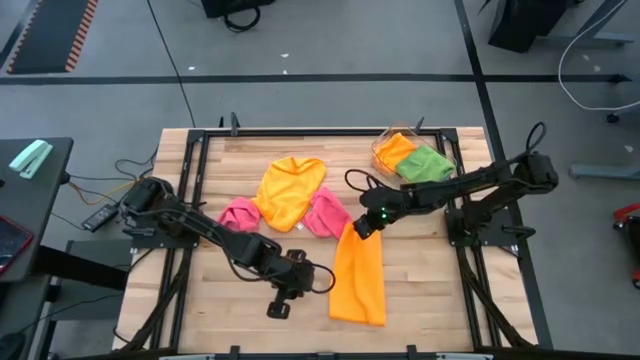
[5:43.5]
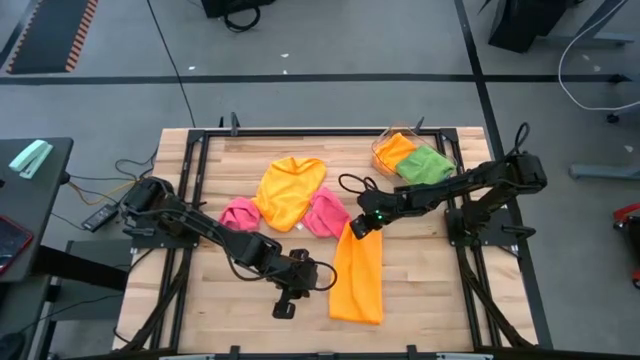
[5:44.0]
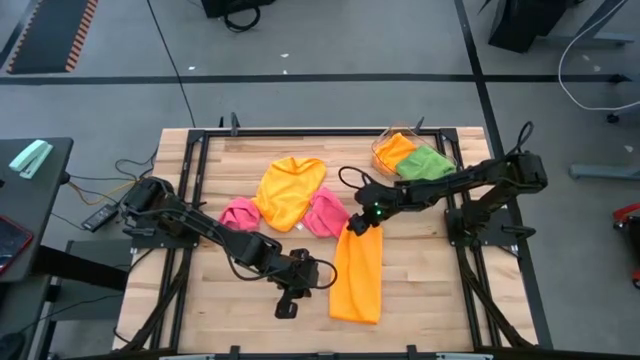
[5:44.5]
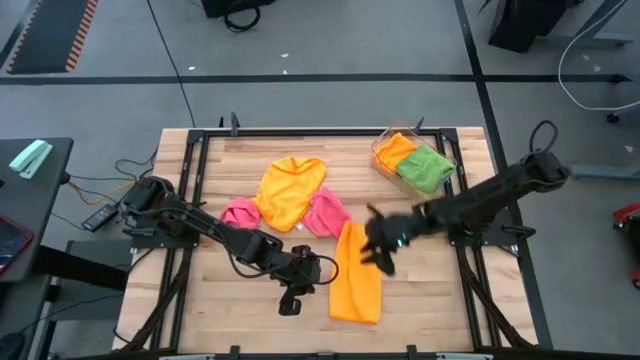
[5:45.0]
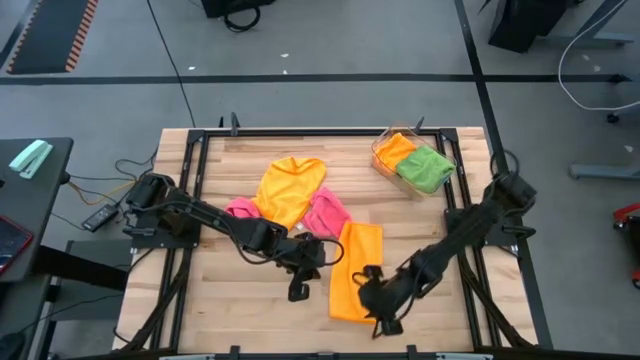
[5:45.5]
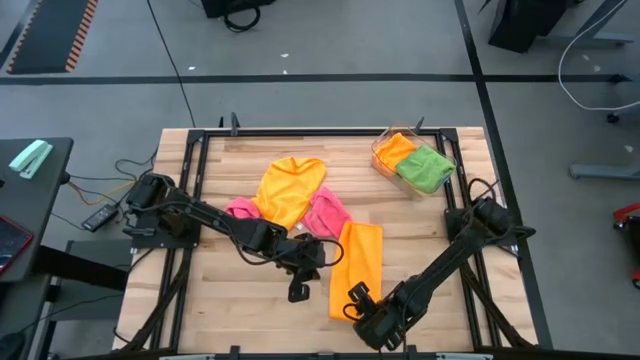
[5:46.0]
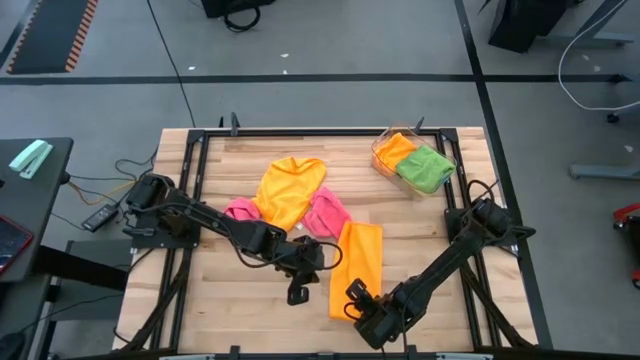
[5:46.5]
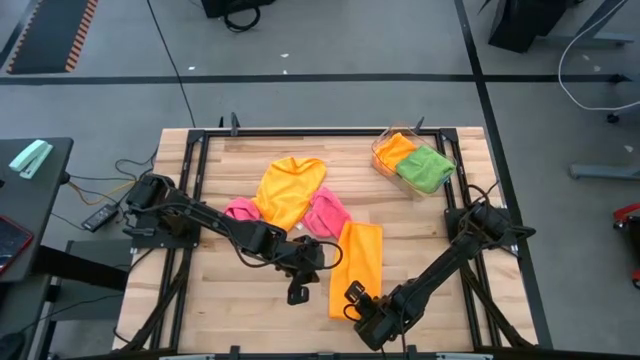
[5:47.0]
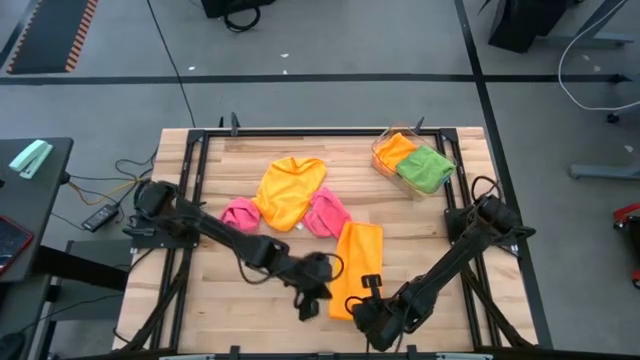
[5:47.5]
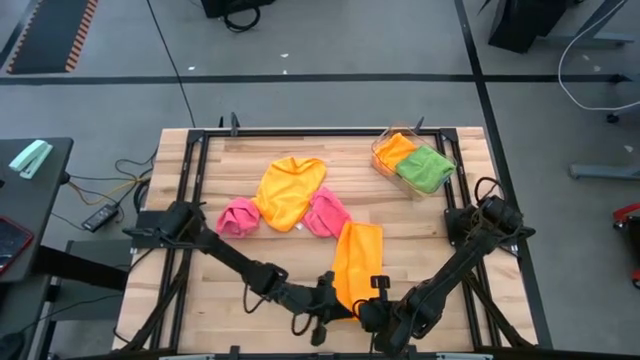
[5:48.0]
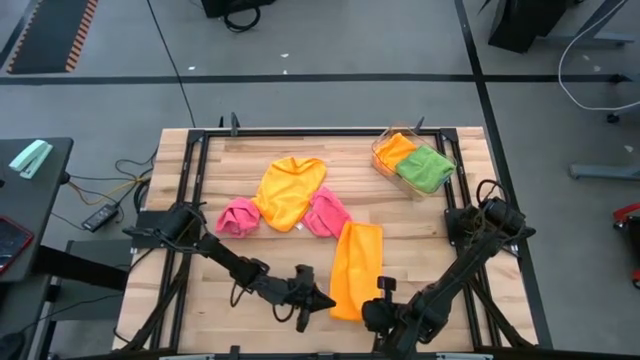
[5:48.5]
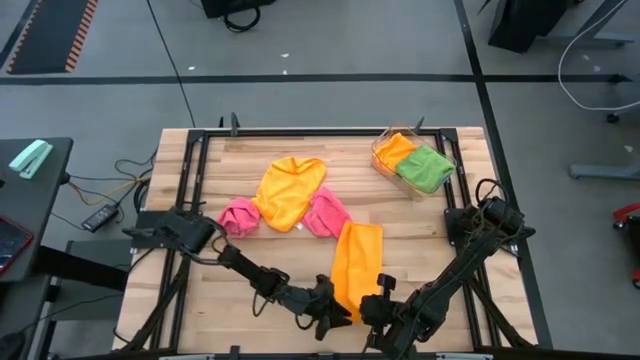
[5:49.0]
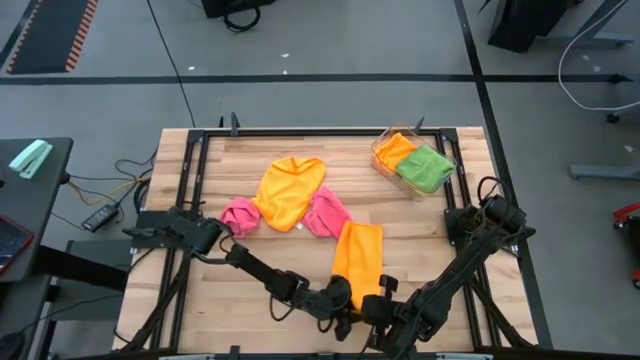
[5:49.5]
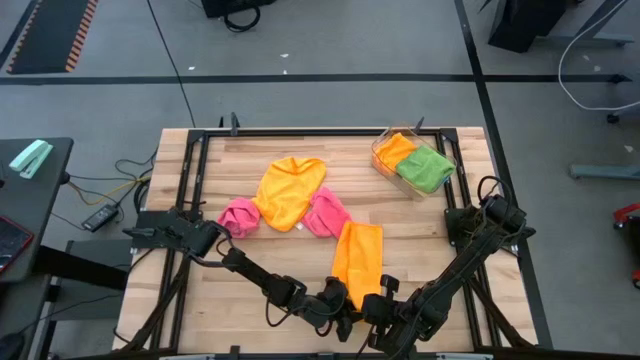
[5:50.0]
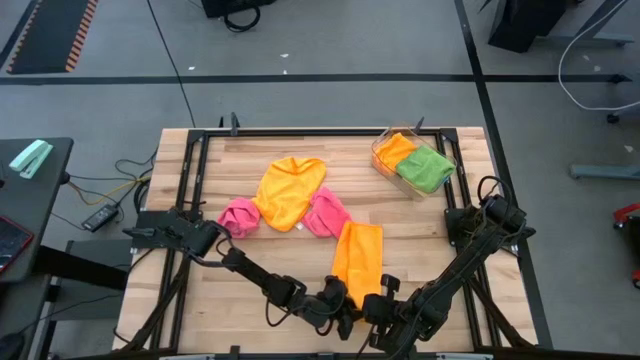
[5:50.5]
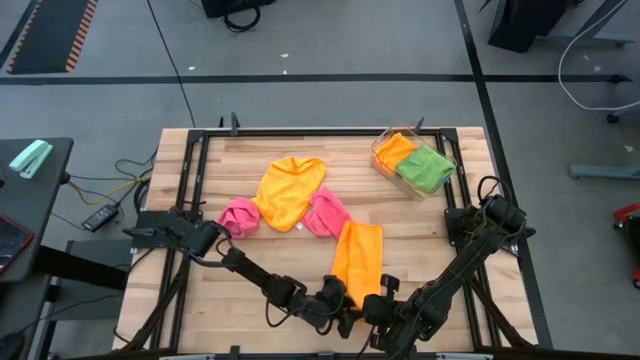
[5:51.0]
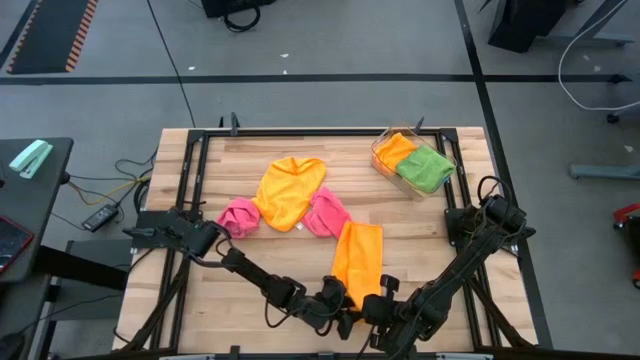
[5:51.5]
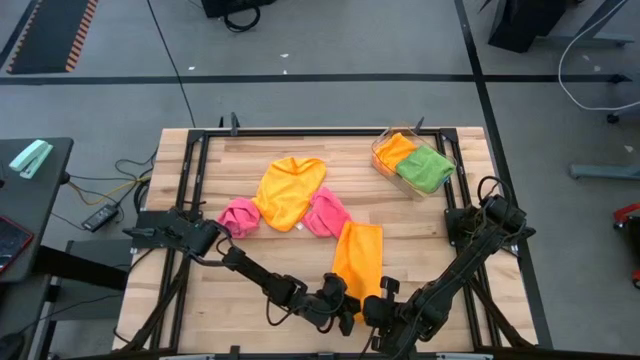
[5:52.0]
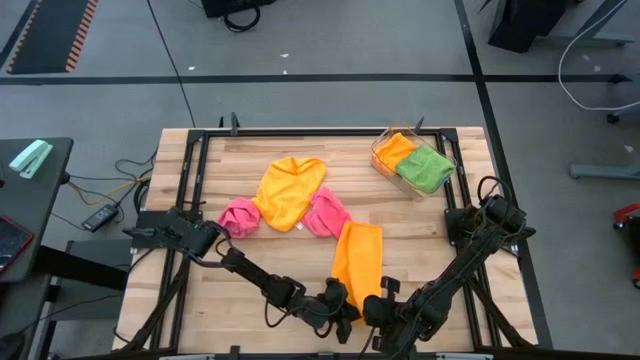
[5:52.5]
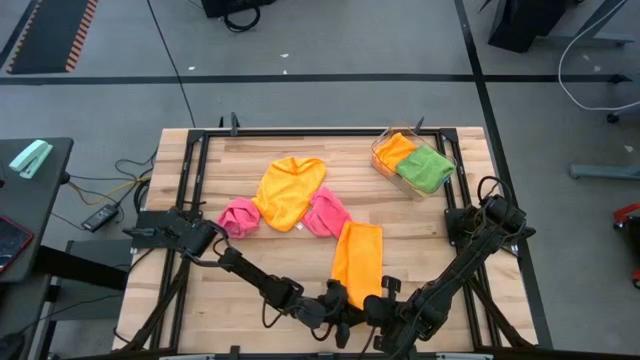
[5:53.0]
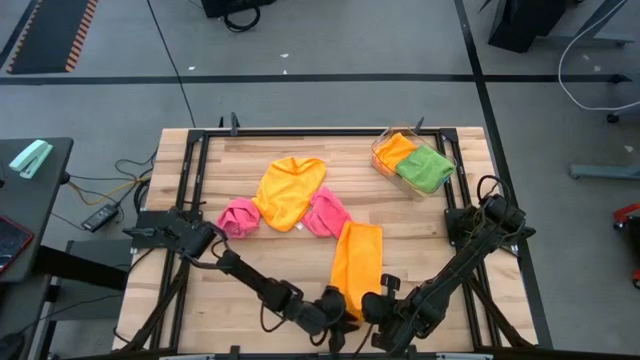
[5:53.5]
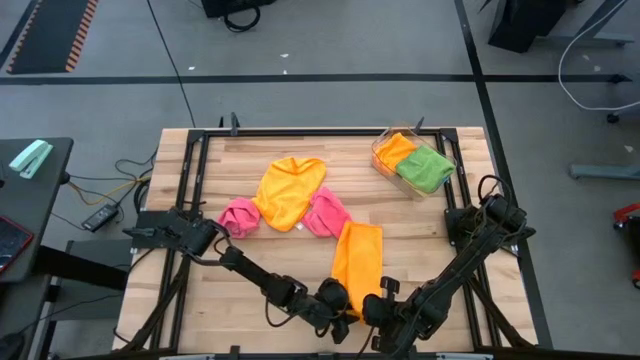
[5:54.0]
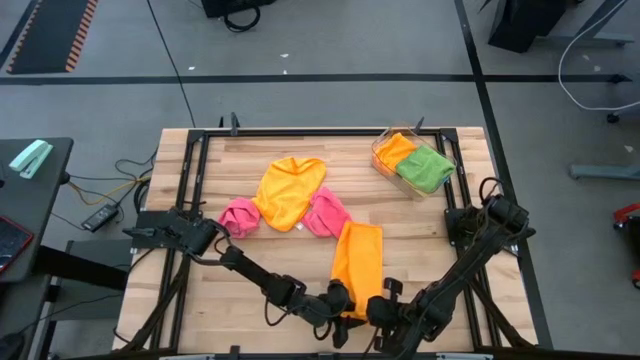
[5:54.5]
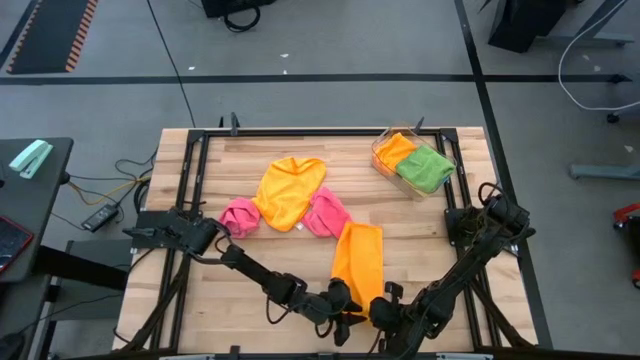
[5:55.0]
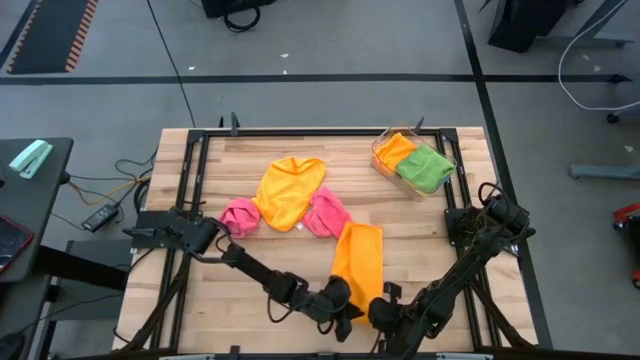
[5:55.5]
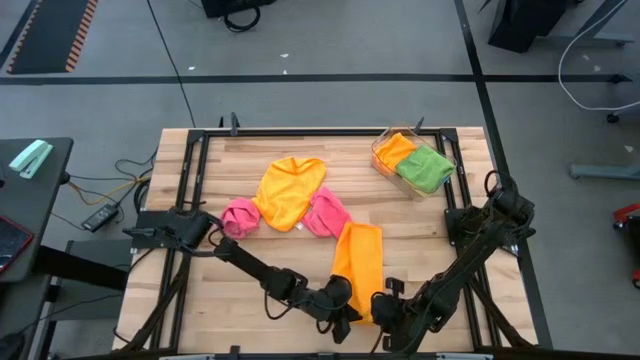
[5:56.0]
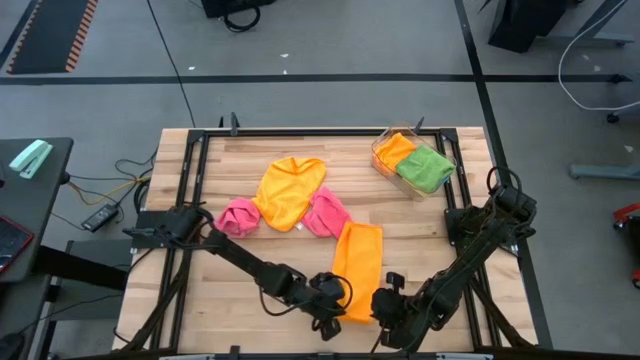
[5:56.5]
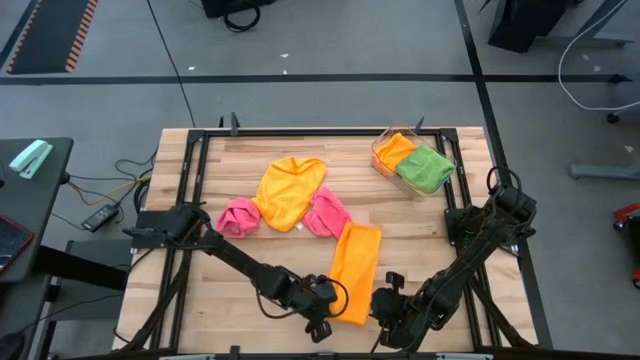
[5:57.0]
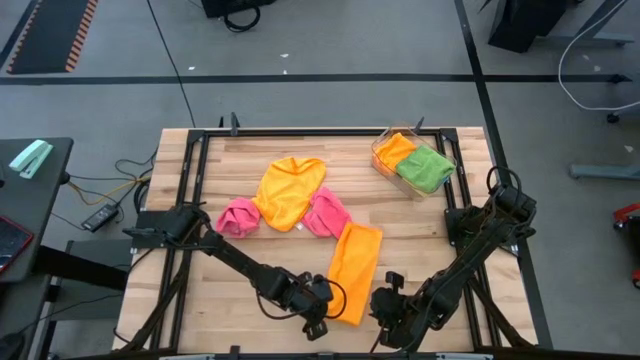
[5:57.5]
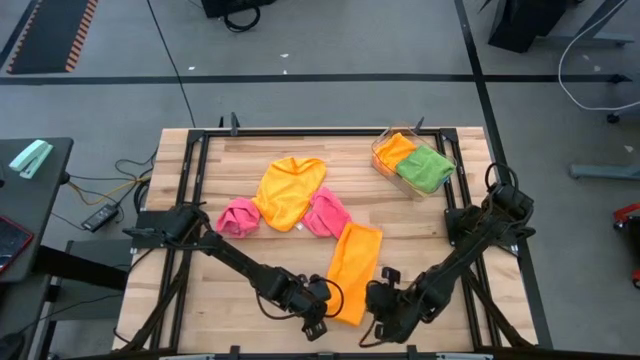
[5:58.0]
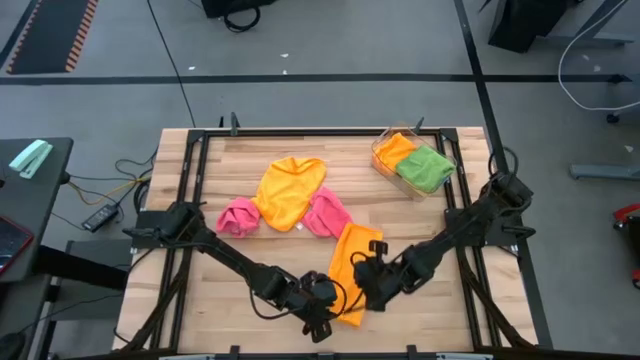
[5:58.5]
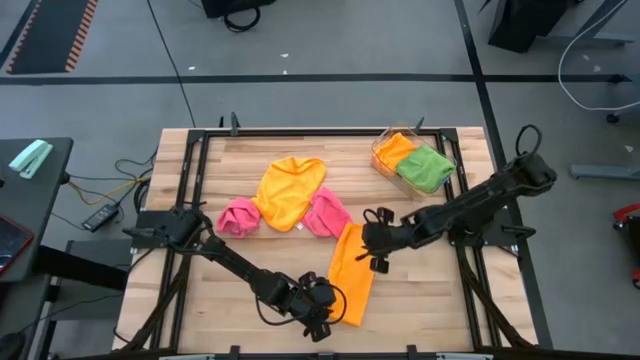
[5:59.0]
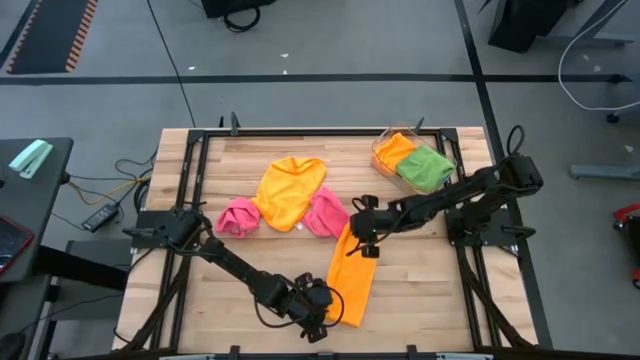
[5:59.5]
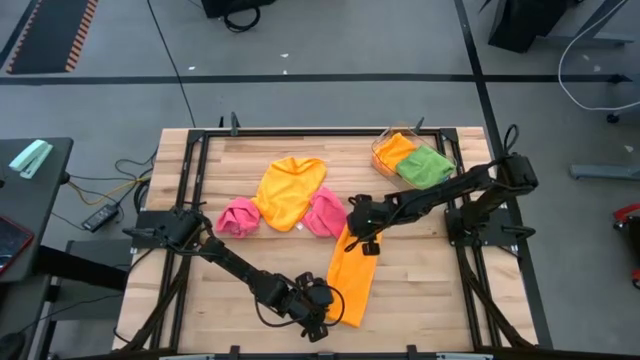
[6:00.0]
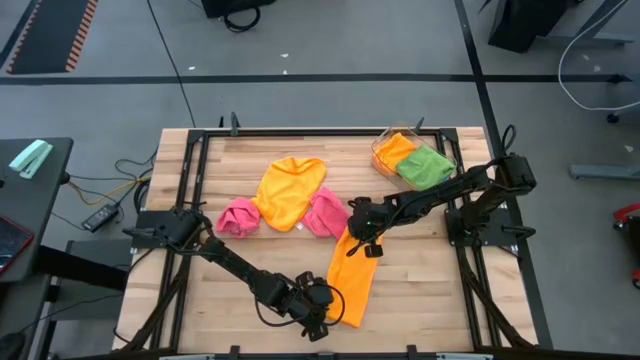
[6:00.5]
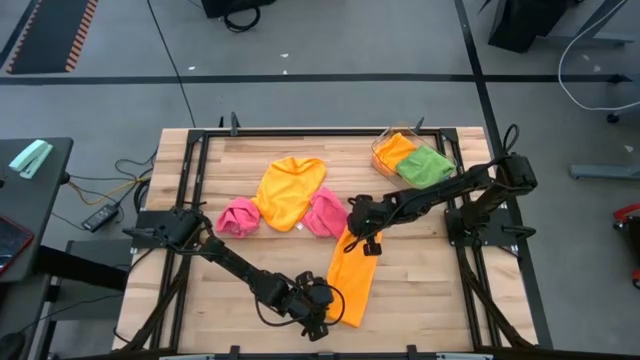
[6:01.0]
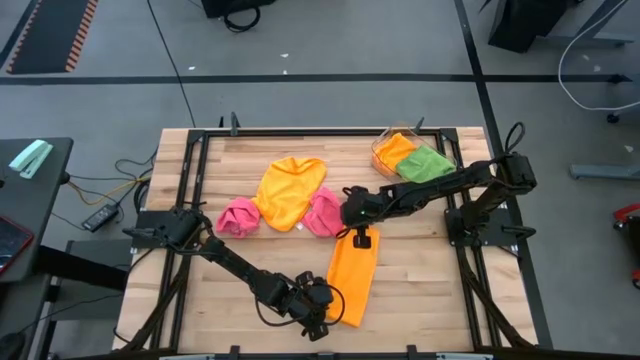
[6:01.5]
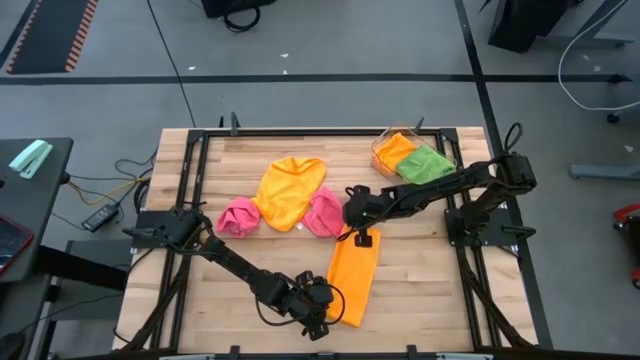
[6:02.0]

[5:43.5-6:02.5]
Task: Fold microfiber towels
Fold the bottom orange towel

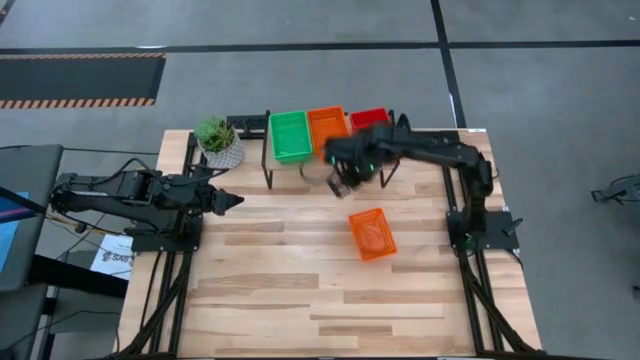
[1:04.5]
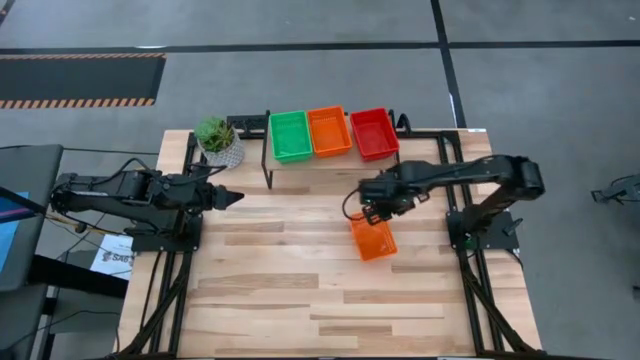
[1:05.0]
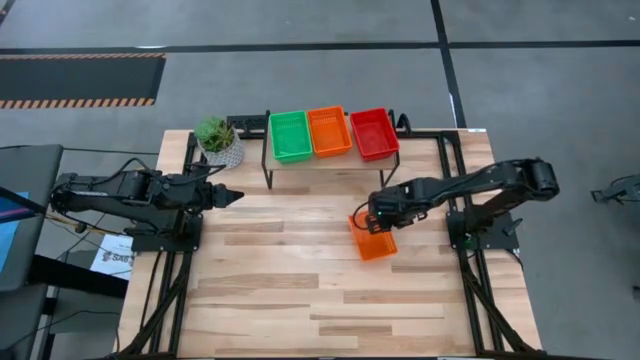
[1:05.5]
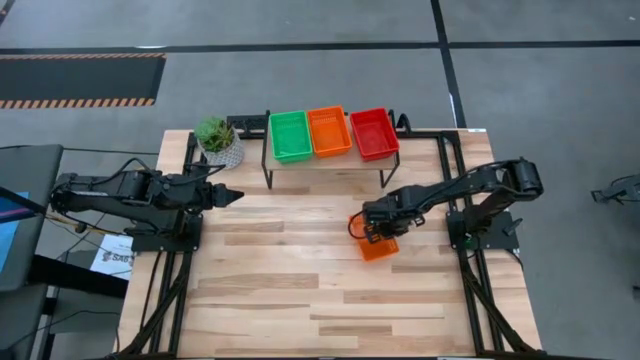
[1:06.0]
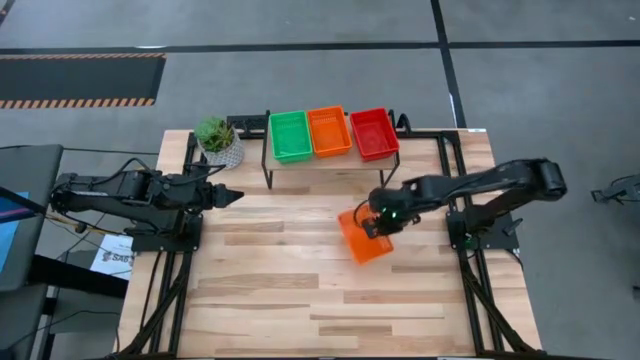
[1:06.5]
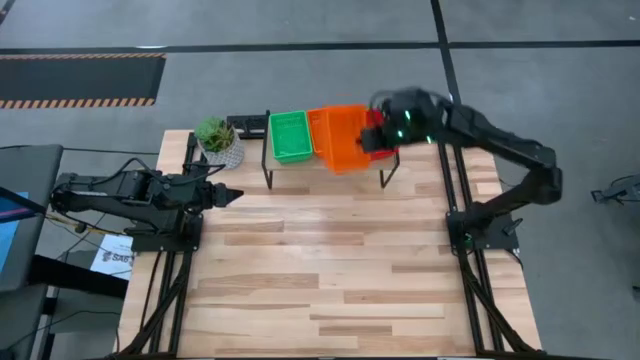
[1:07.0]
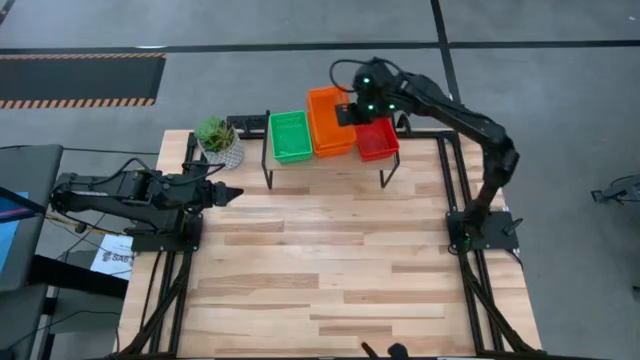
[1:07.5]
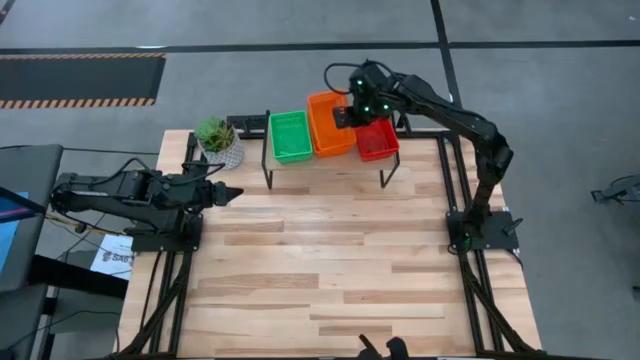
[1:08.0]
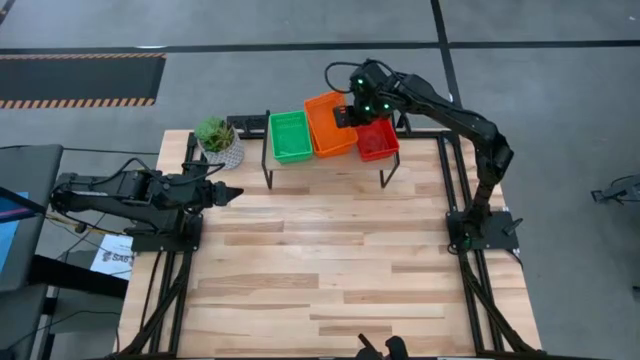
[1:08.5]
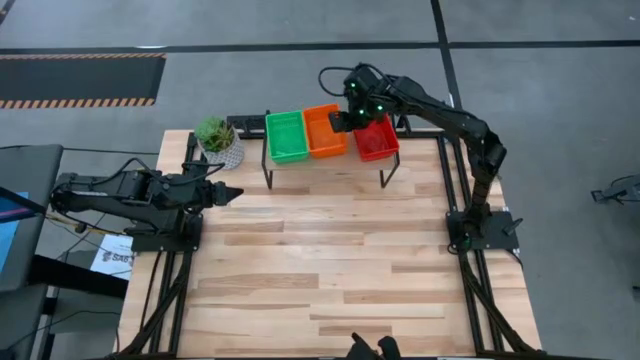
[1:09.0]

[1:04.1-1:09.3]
Task: Stack baskets on shelf by color
Stack the orange bin on top of the orange bin on the shelf
